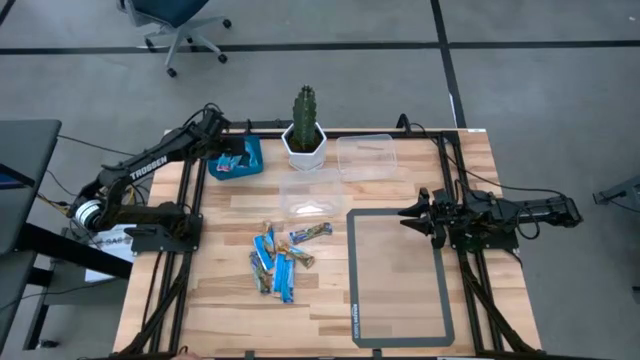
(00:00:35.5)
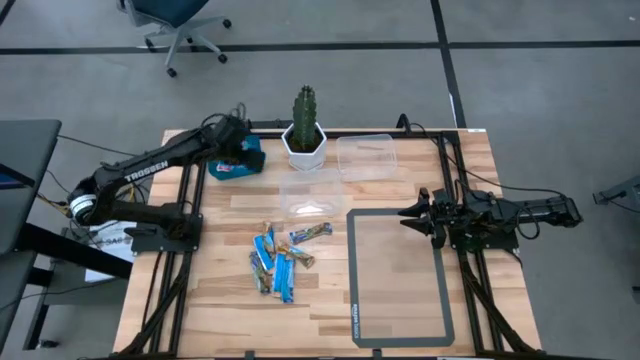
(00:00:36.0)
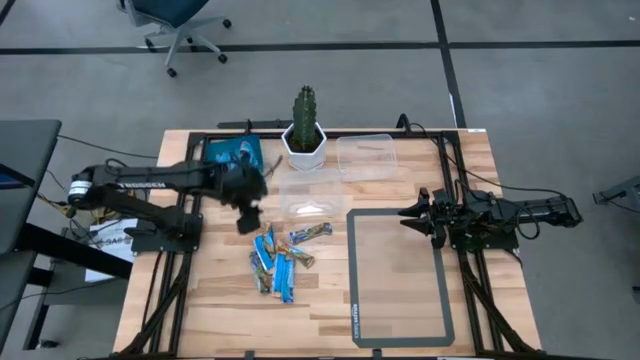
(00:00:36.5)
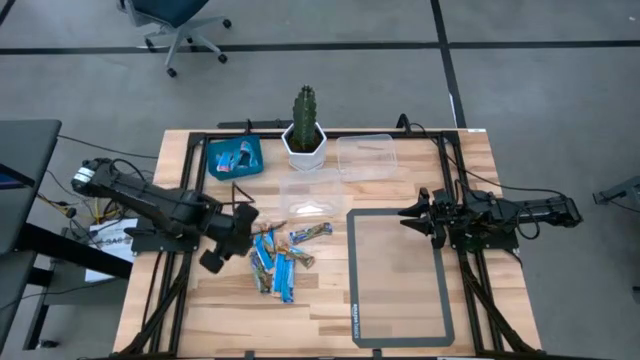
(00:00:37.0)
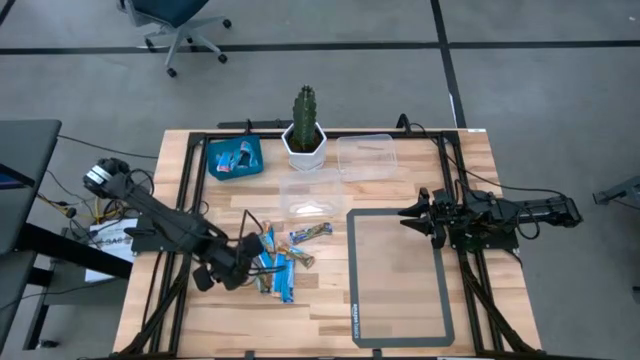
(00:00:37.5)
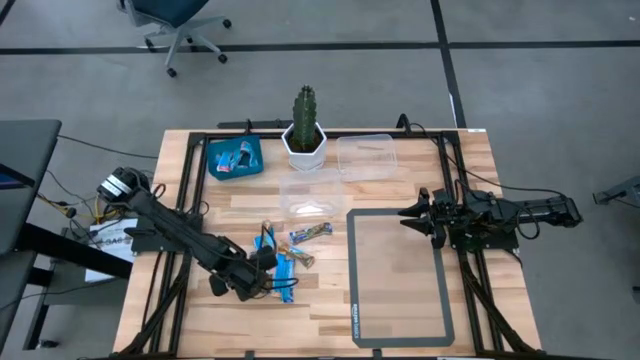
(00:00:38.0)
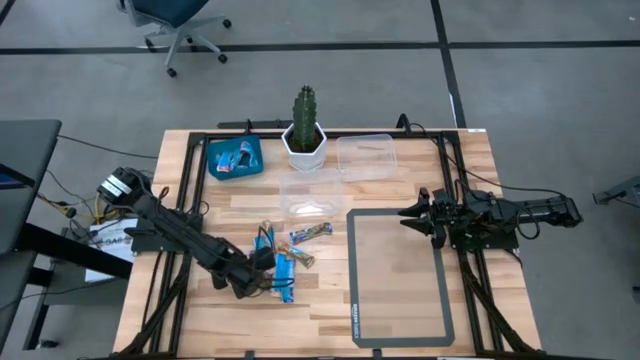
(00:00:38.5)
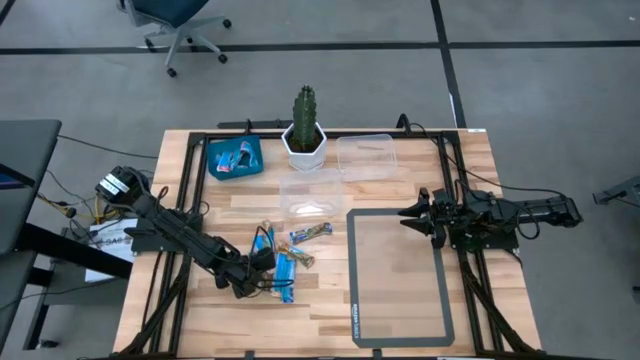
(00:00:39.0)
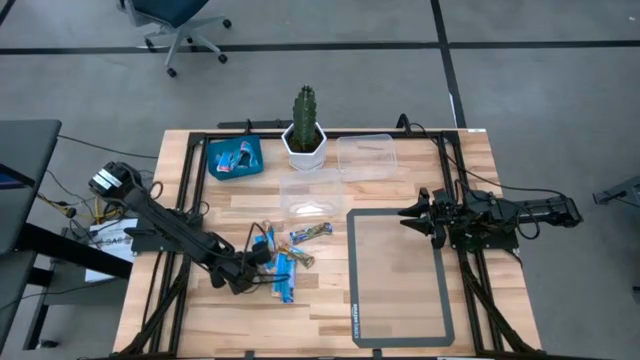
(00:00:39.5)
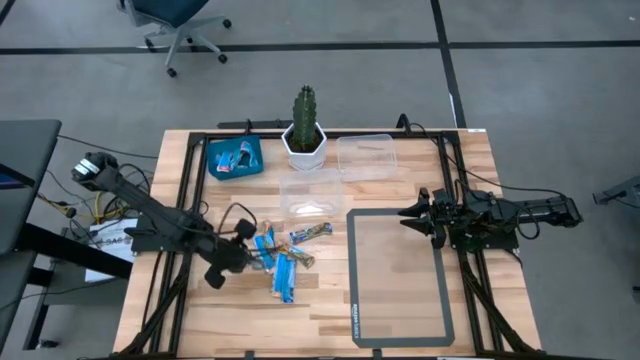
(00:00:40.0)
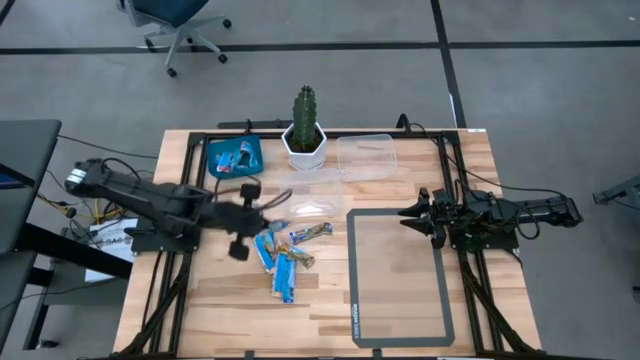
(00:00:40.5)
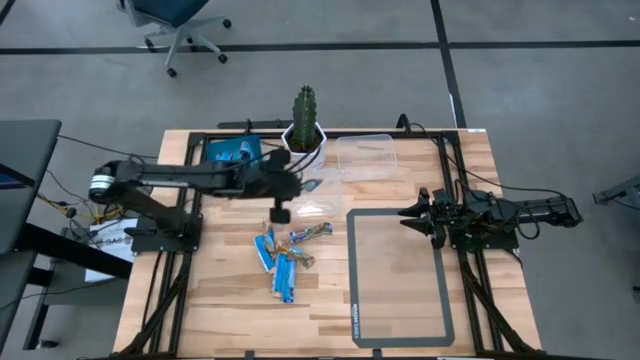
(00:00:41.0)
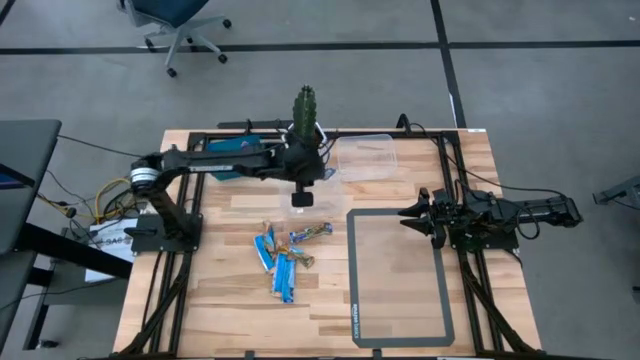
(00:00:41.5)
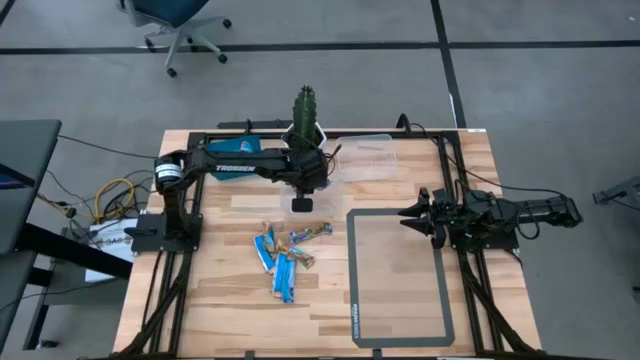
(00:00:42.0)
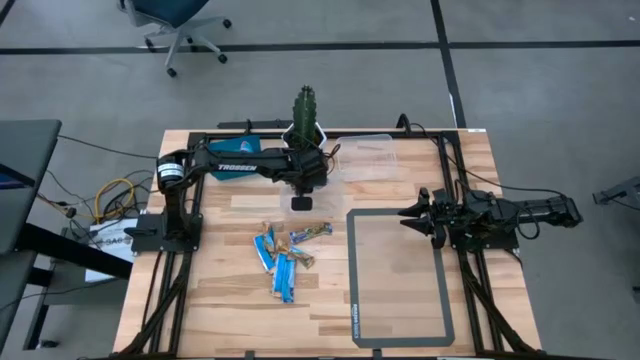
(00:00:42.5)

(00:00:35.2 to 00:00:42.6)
Task: Pick and place Granola Bars by type
Put the blue granola bar into the bottom transparent bin

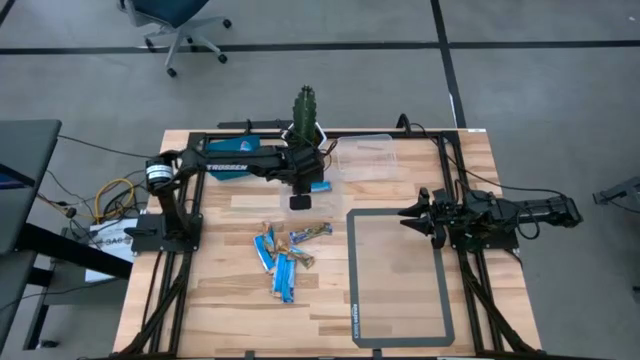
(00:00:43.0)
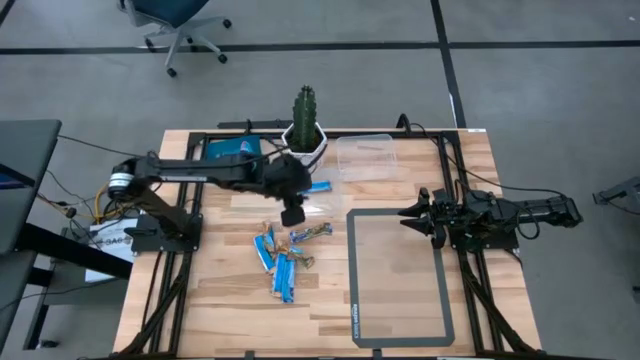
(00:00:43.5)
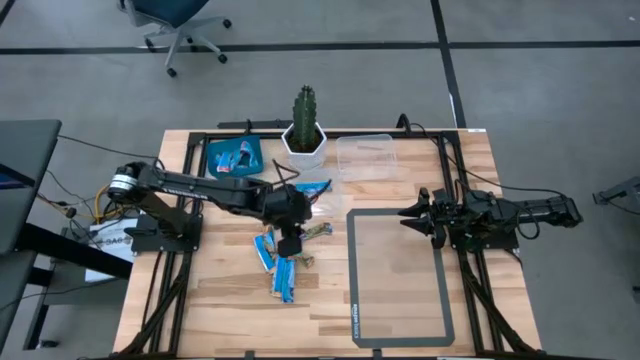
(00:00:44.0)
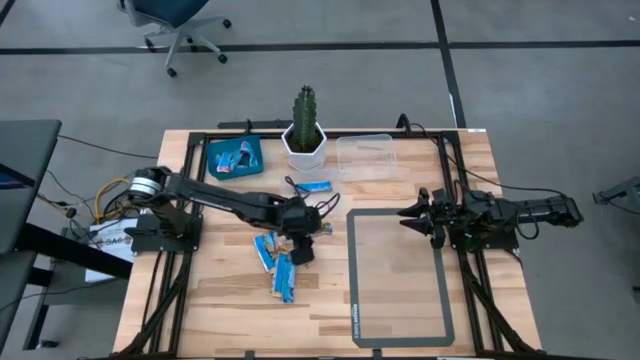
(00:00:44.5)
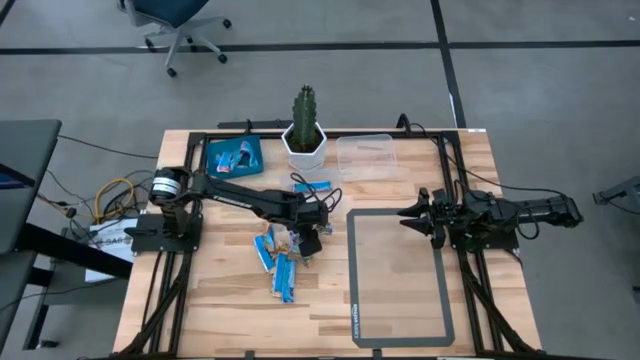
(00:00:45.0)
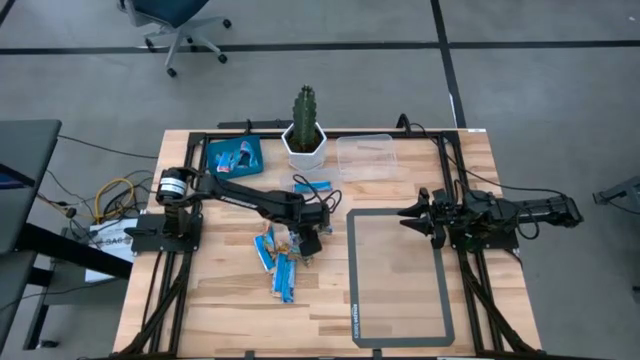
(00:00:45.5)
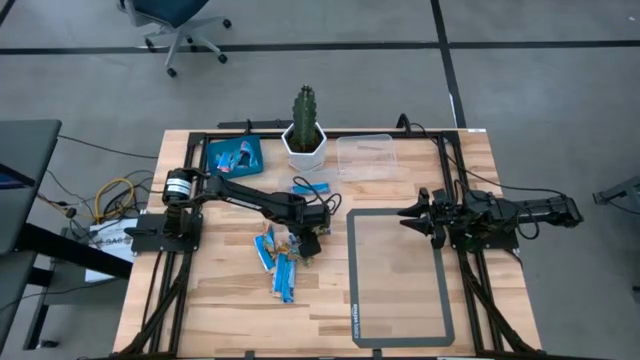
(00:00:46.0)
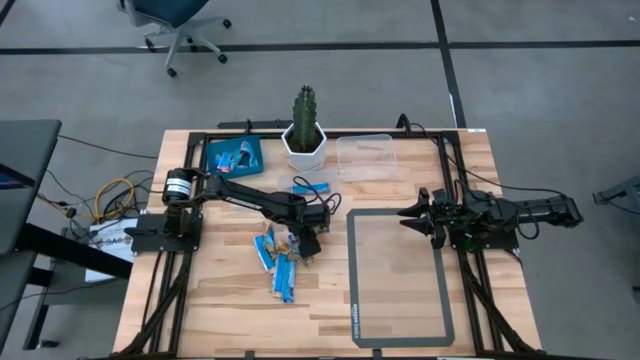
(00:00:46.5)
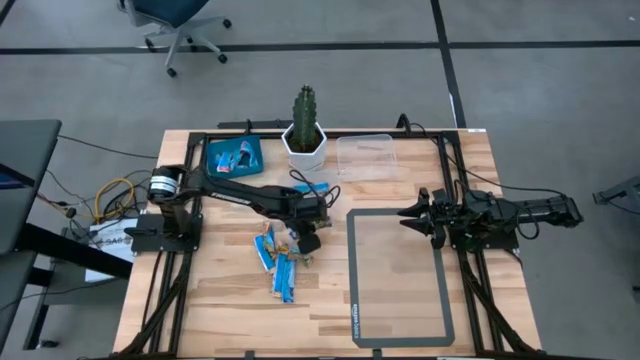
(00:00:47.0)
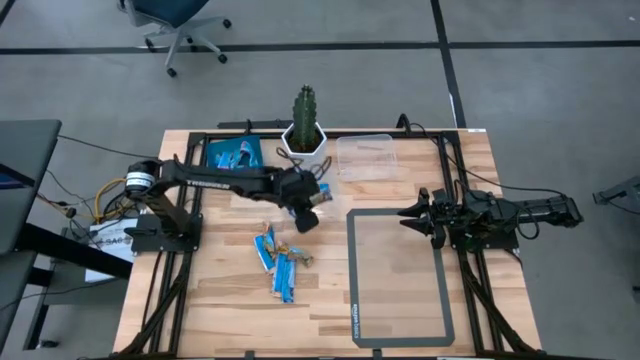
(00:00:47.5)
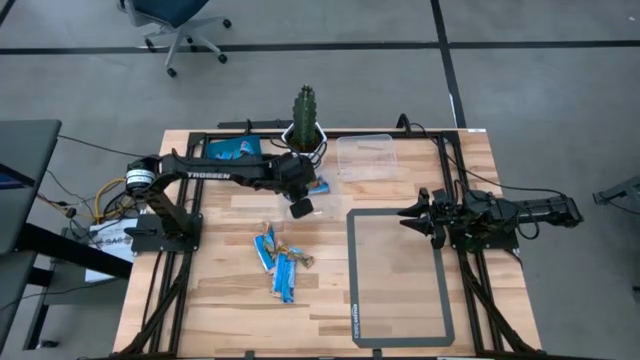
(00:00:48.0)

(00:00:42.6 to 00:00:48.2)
Put the blue granola bar into the bottom transparent bin

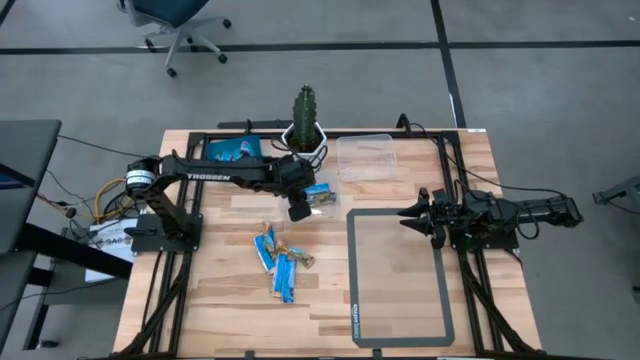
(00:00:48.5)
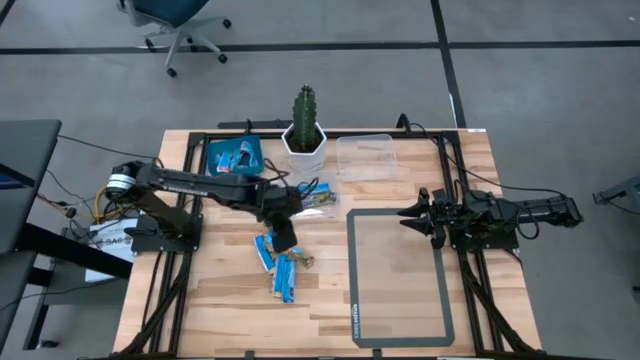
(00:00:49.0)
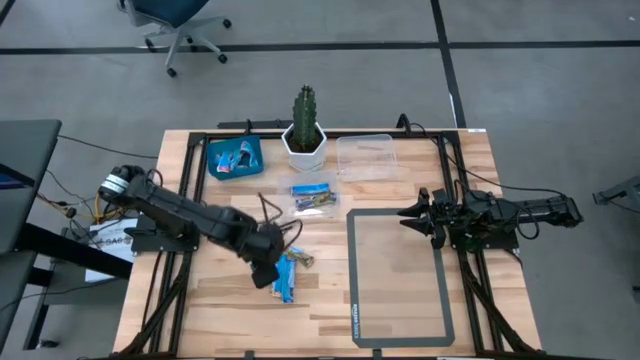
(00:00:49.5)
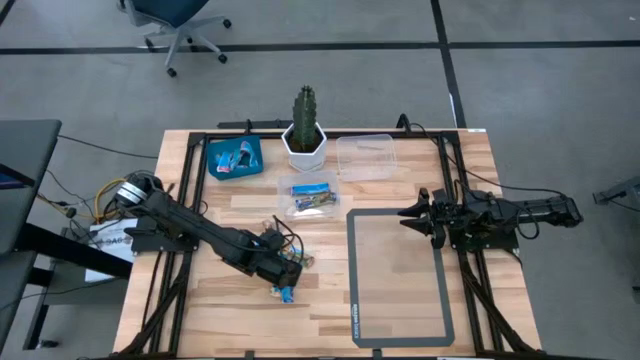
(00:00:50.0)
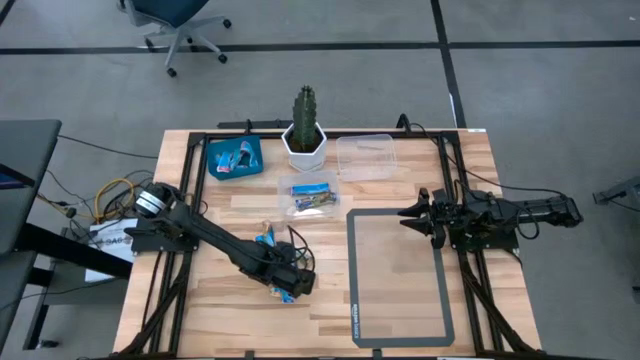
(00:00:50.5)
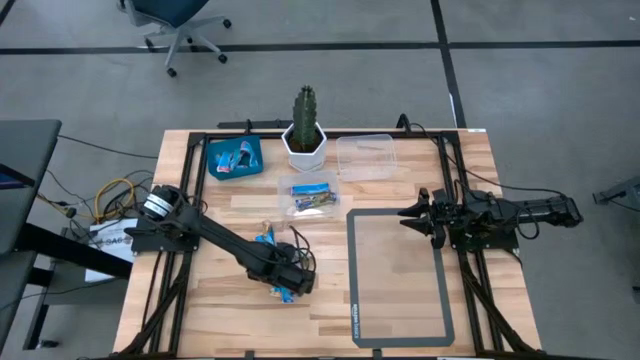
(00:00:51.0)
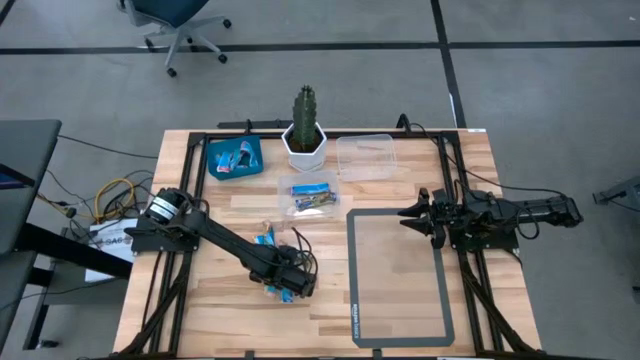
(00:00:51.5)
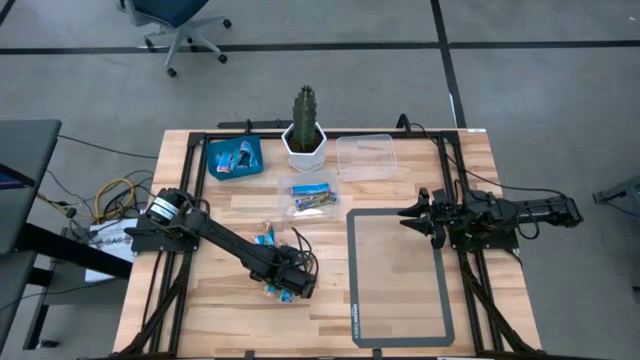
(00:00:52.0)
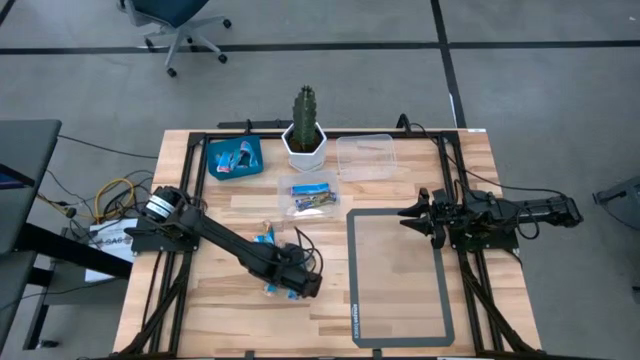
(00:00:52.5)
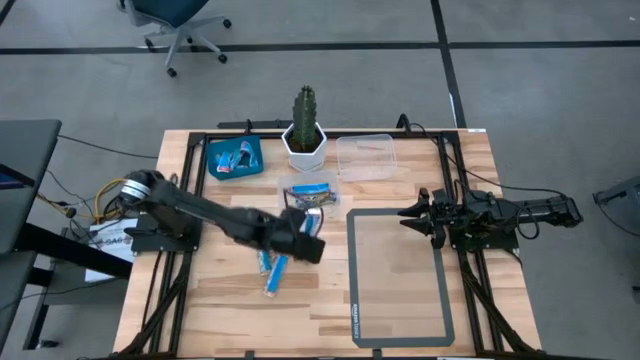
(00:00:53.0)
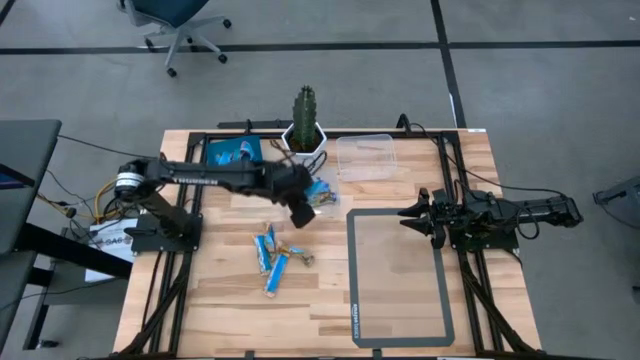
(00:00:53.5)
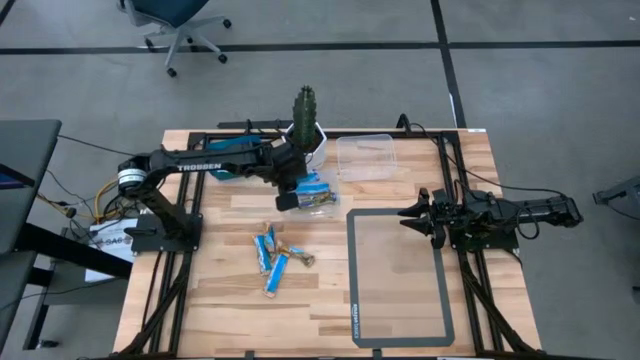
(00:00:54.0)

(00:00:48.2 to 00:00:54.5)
Put the blue granola bar into the bottom transparent bin

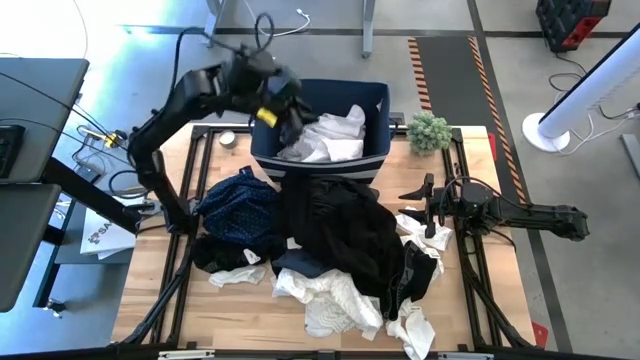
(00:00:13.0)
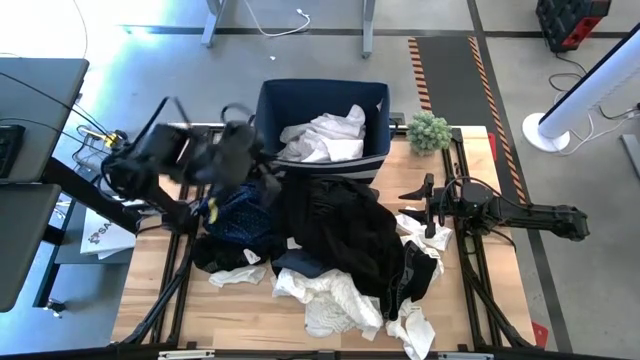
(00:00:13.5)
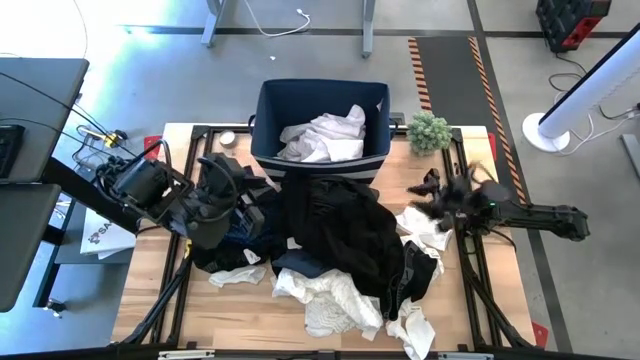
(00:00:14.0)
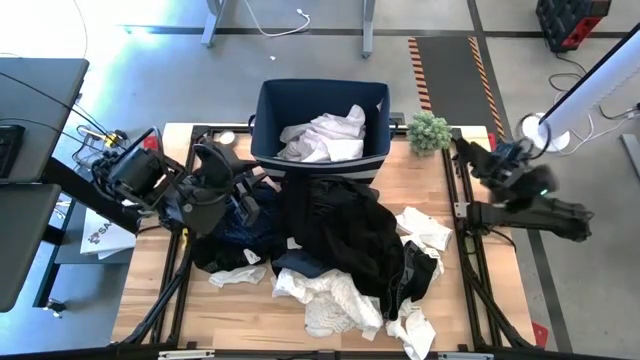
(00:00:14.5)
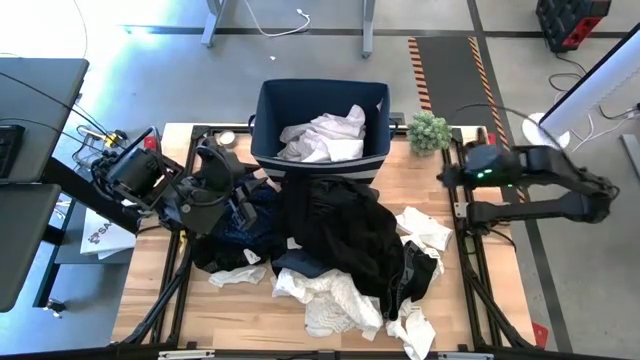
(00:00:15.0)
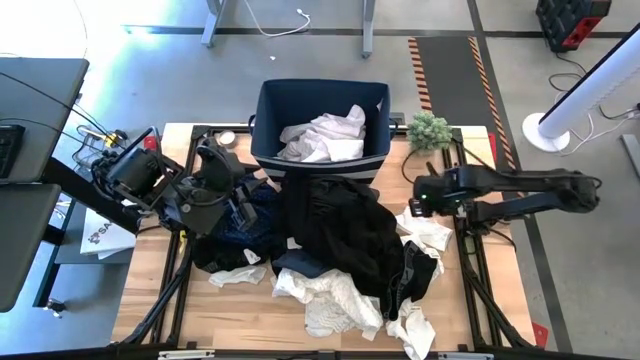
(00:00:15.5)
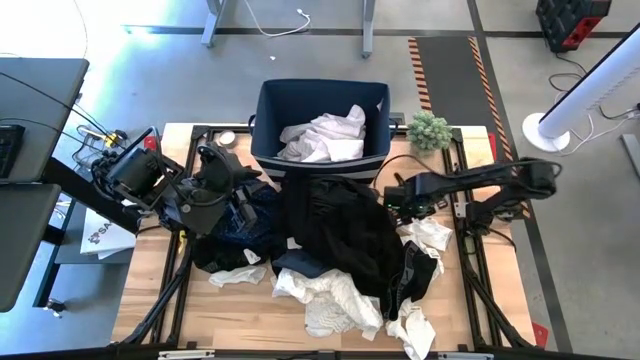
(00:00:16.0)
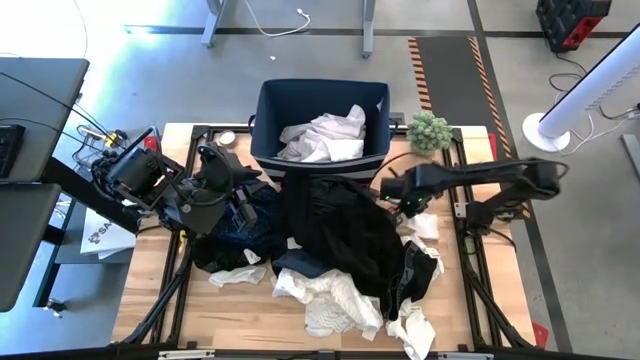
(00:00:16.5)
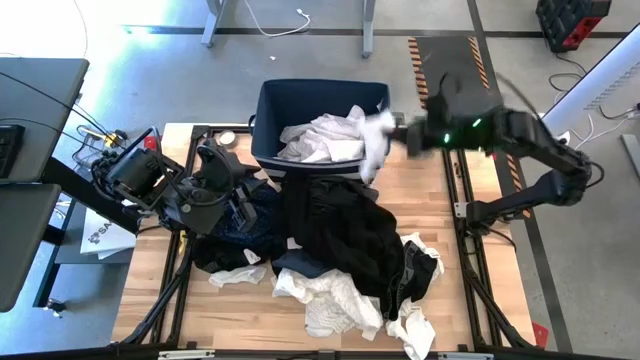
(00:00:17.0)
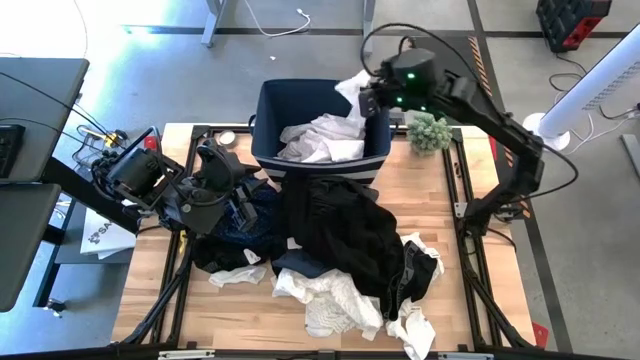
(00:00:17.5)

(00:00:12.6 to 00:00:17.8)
Task: Sort clothes
Put the top white sock into the blue bin
